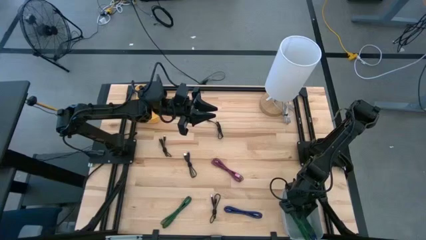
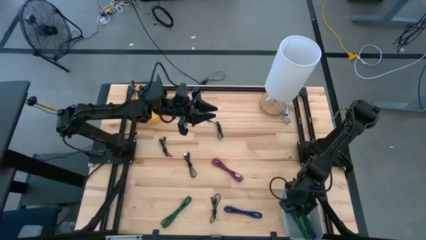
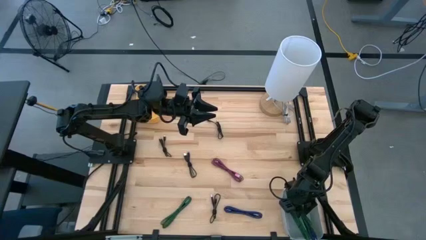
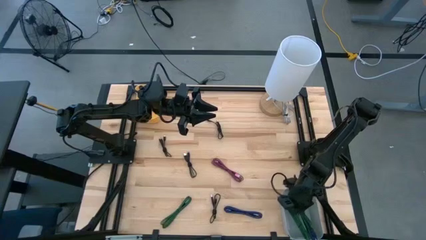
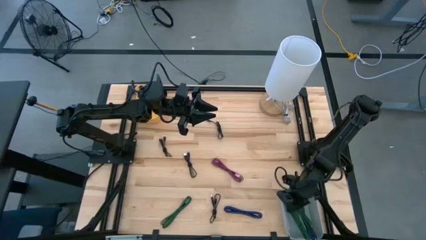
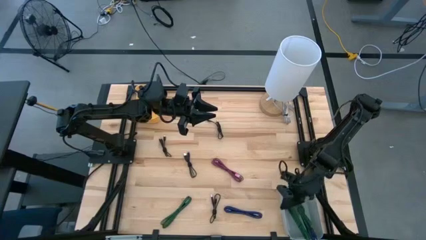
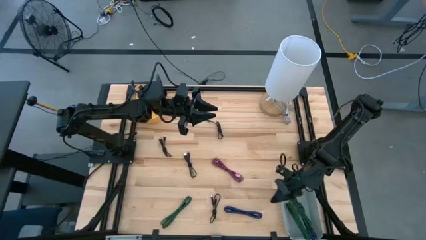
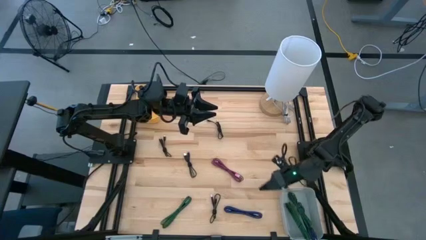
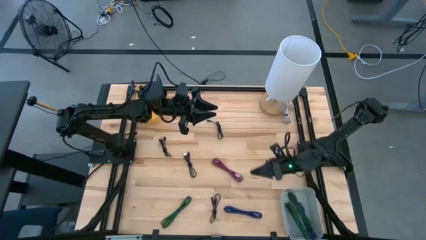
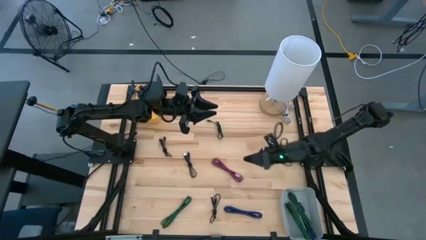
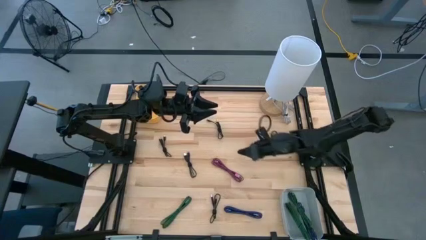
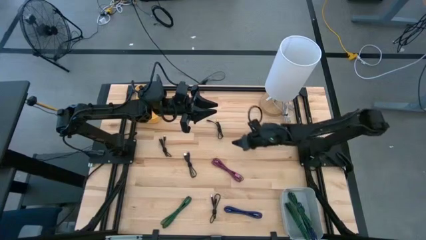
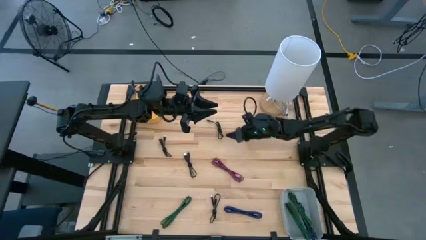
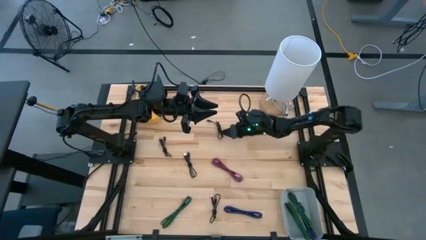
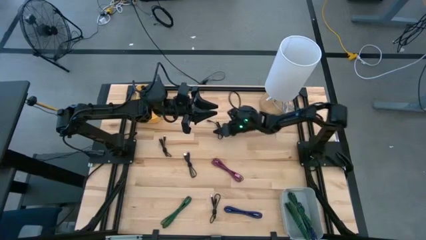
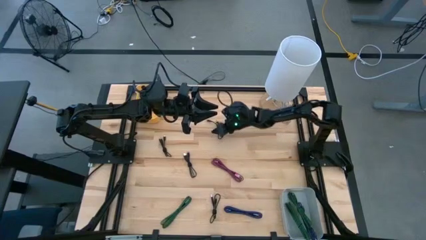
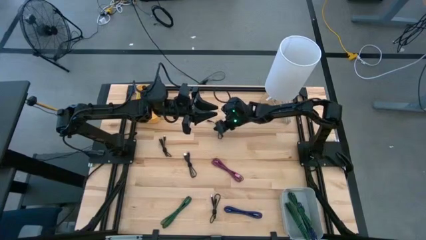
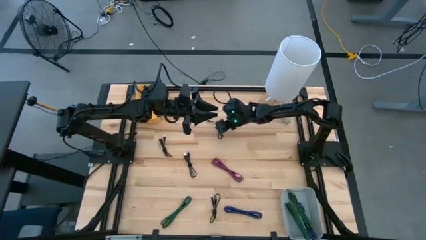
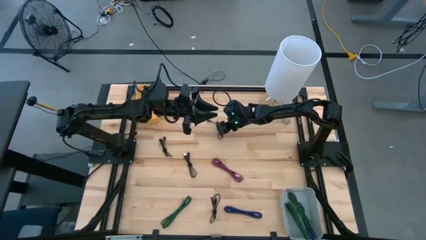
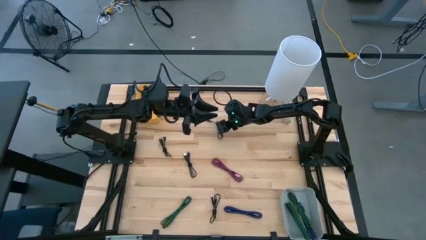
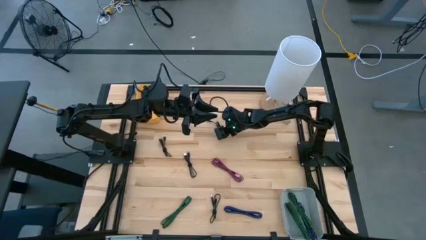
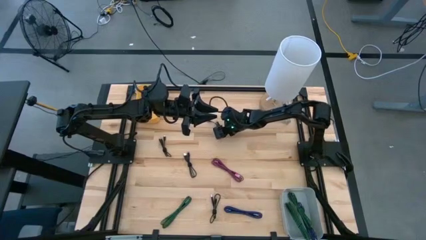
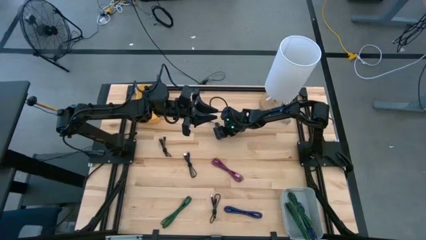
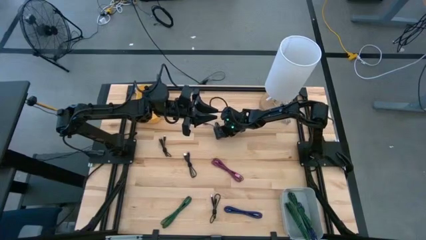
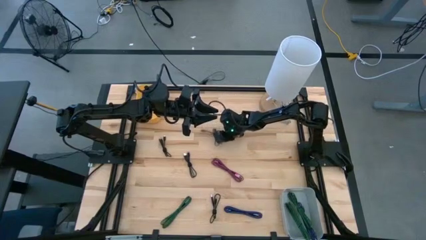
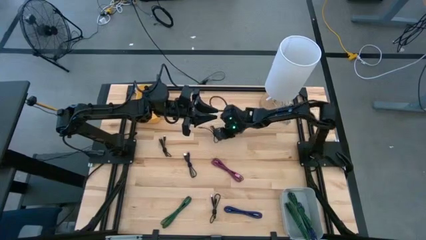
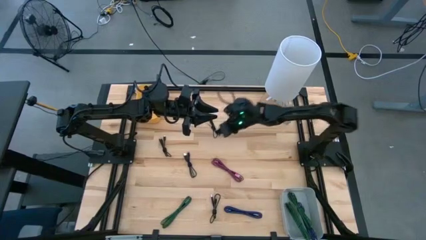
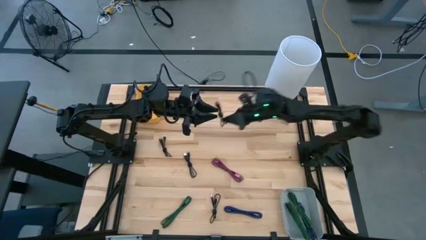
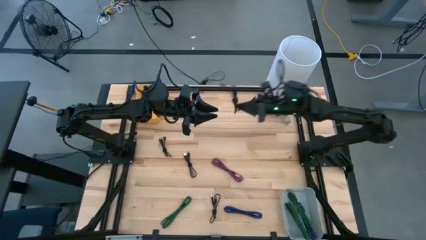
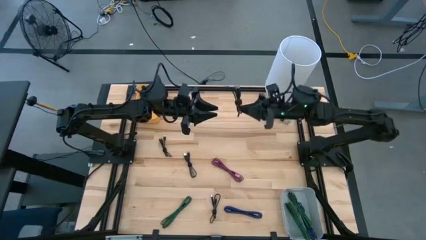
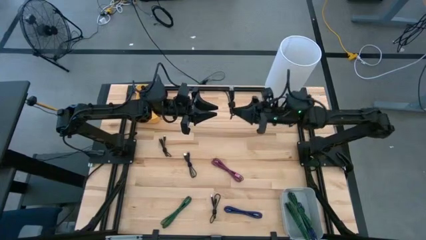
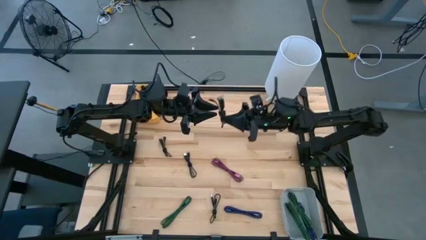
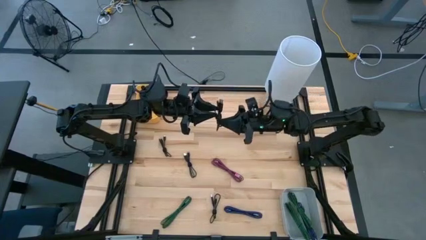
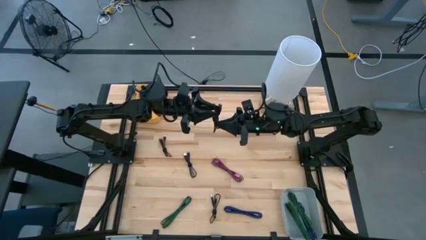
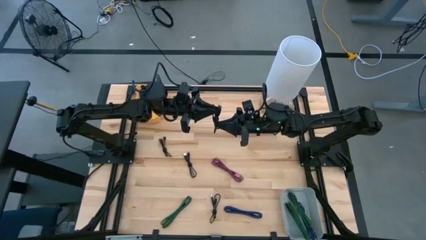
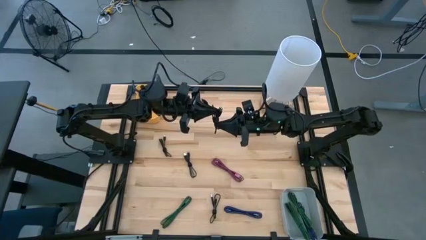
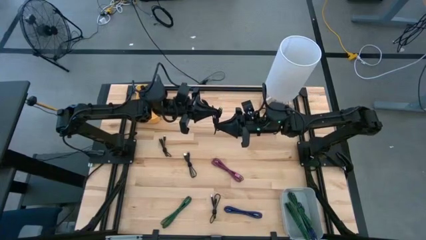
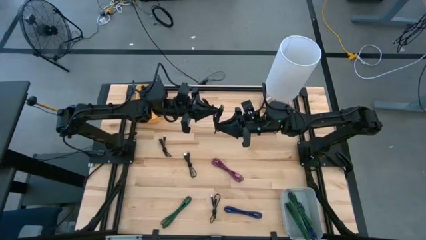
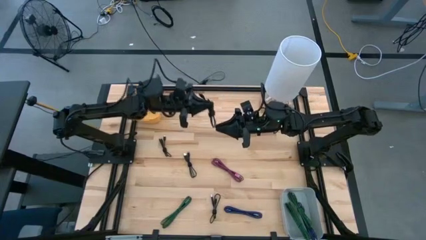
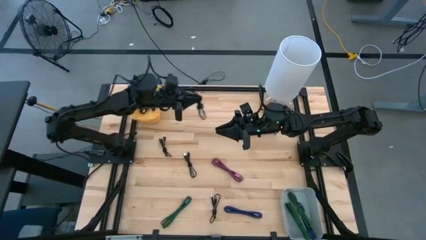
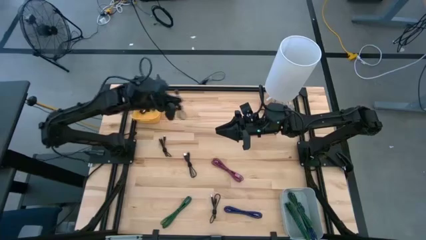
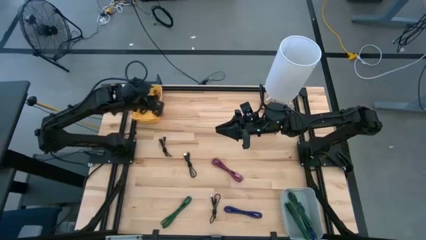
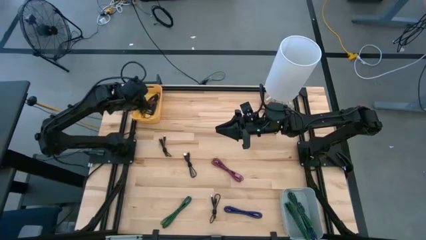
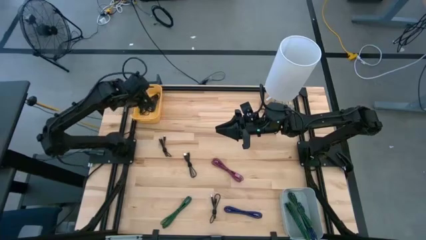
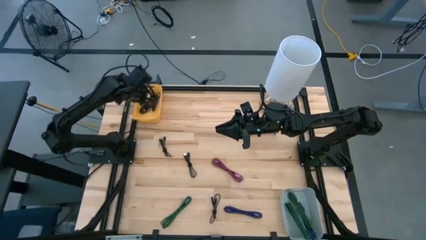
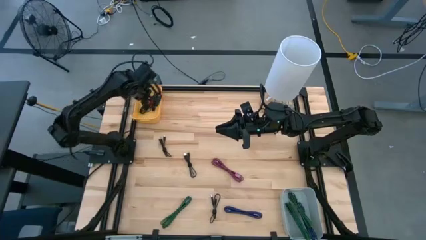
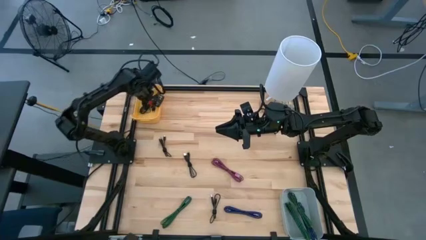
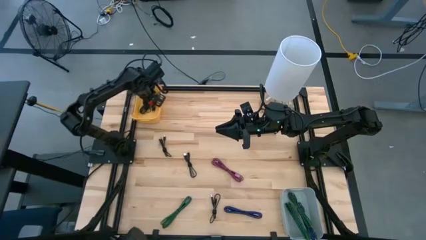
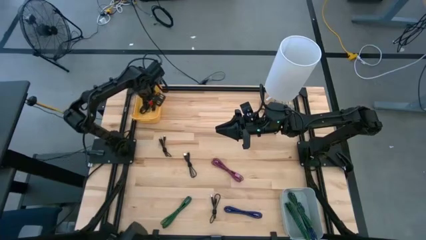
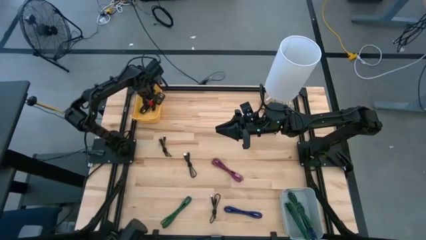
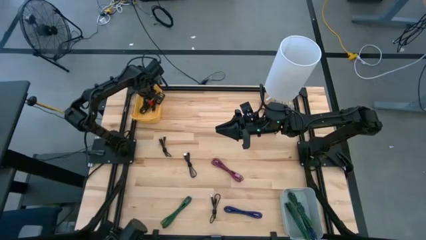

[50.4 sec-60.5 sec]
Task: Pick & Place USB Port
Put the black charger cable into the yellow bin

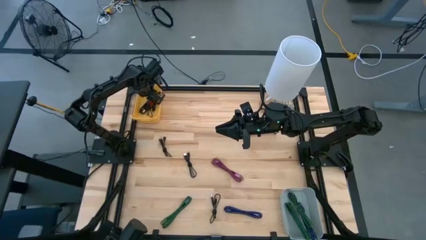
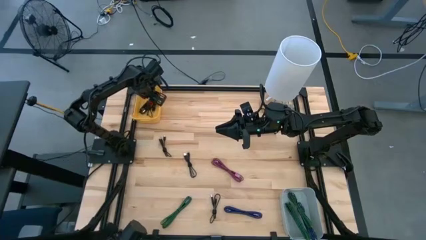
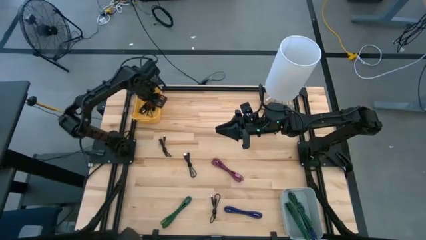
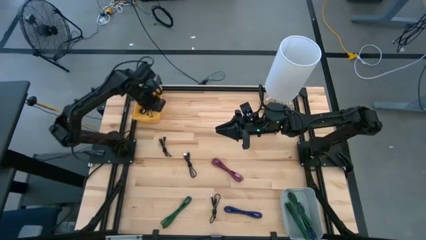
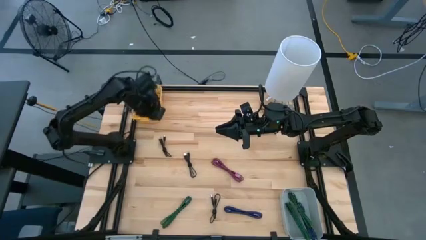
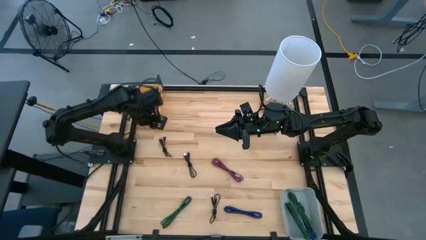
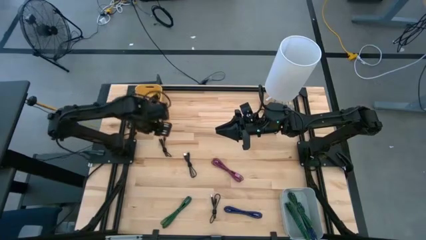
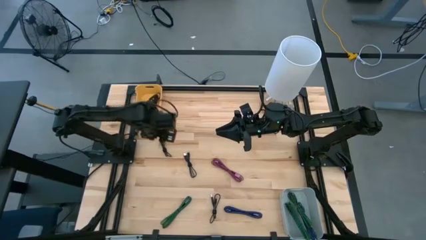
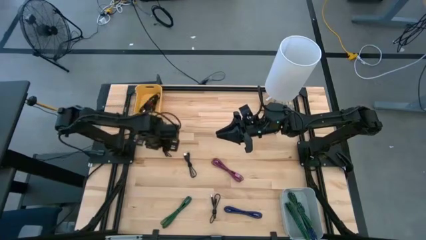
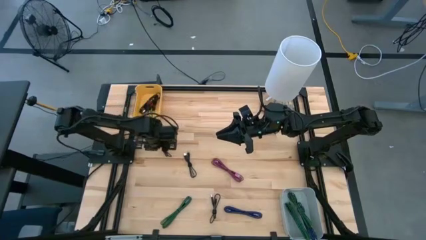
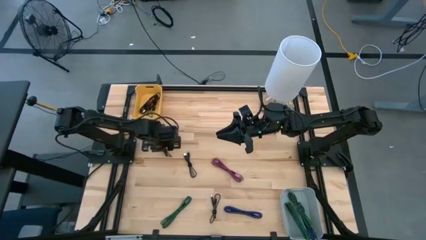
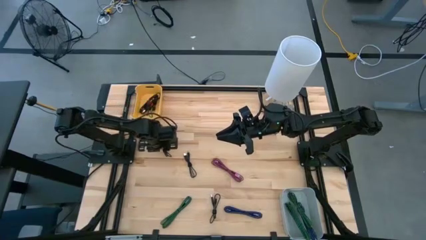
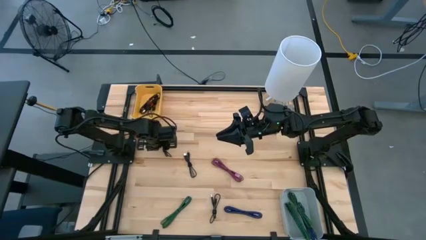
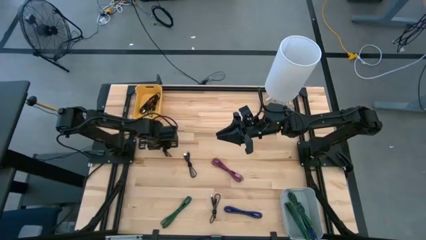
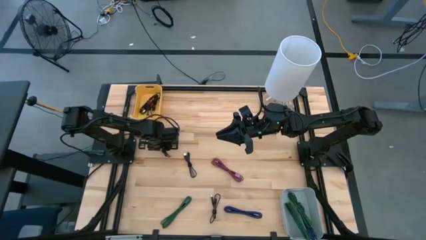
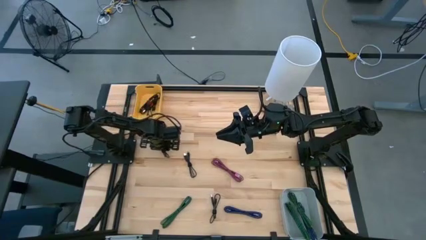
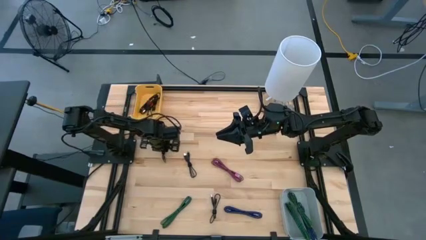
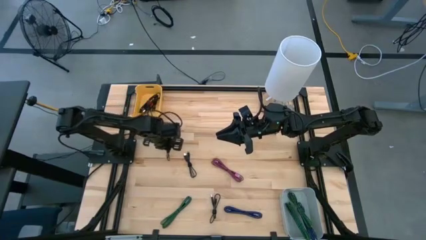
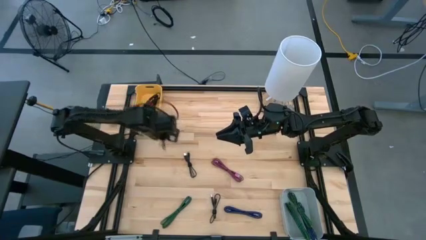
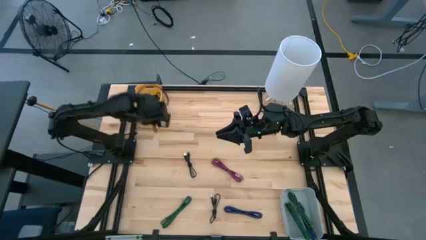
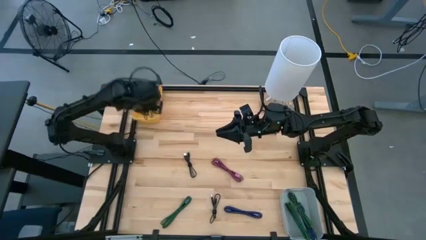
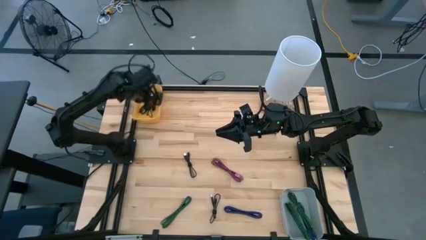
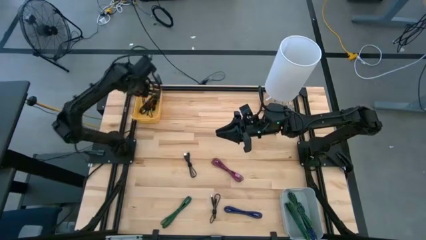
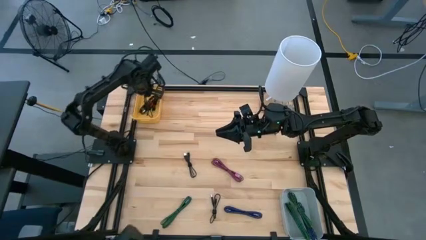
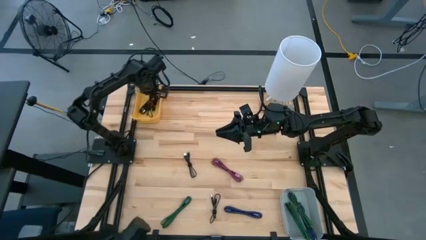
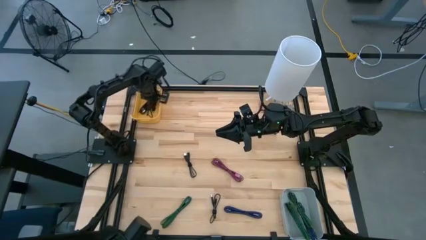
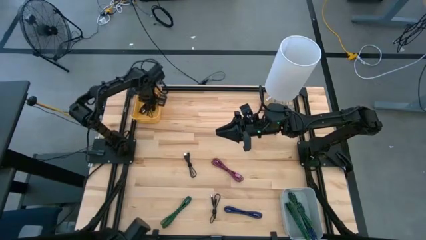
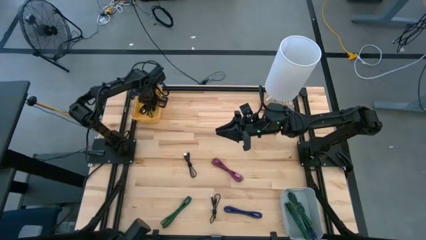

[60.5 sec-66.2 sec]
Put the black charger cable into the yellow bin
